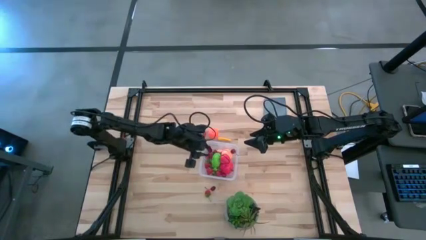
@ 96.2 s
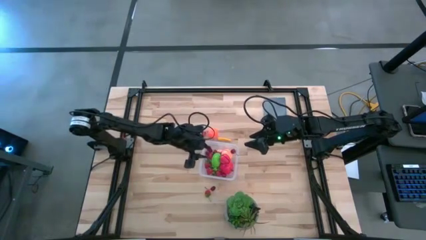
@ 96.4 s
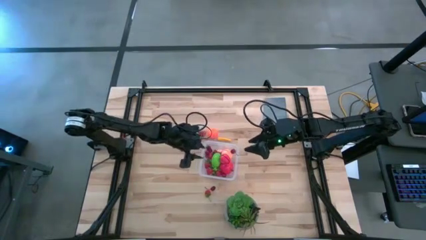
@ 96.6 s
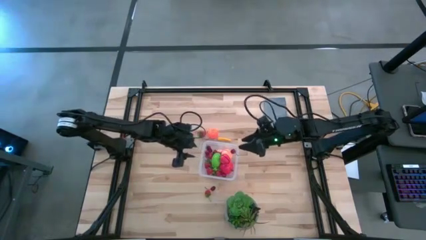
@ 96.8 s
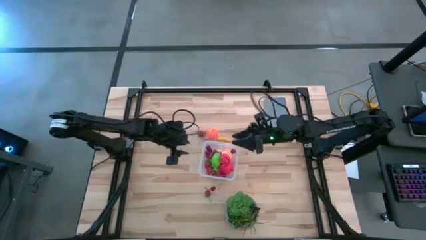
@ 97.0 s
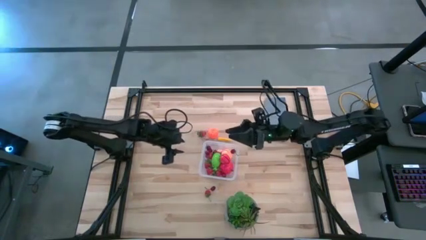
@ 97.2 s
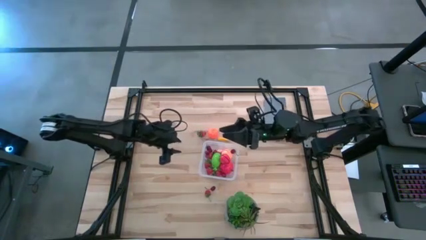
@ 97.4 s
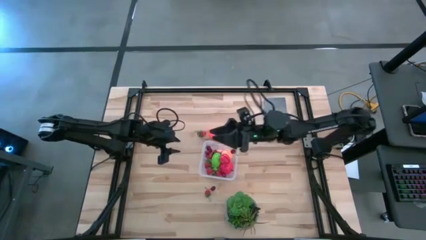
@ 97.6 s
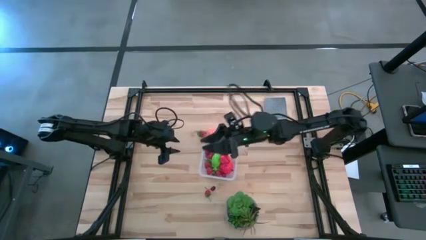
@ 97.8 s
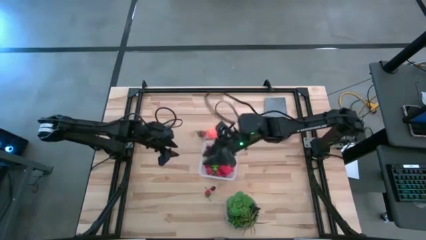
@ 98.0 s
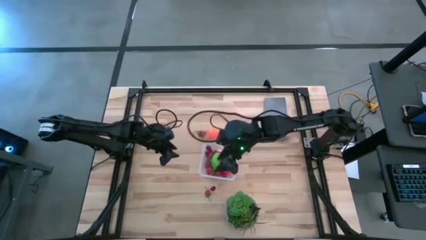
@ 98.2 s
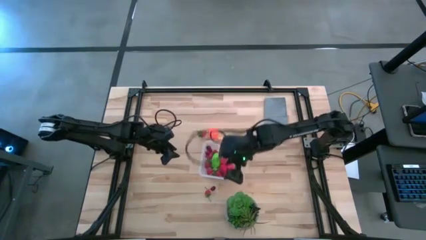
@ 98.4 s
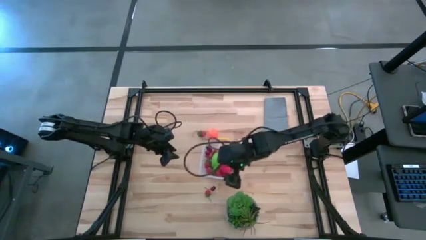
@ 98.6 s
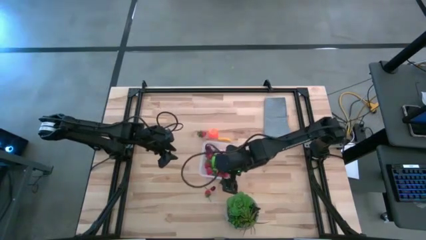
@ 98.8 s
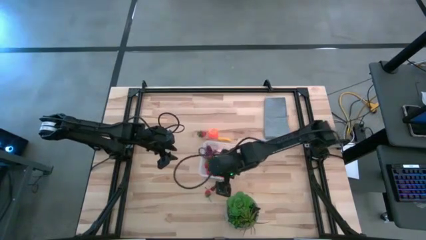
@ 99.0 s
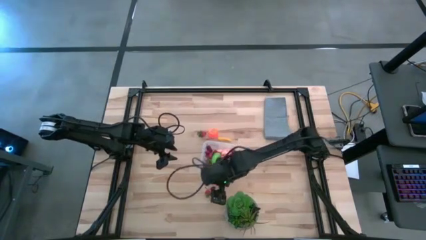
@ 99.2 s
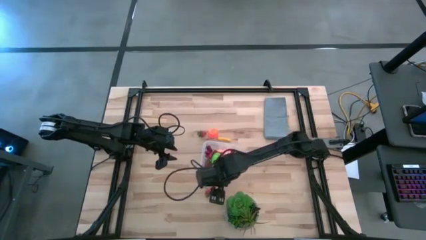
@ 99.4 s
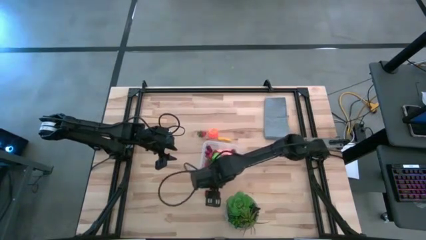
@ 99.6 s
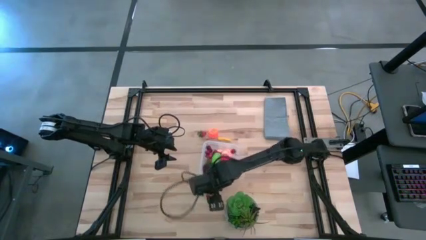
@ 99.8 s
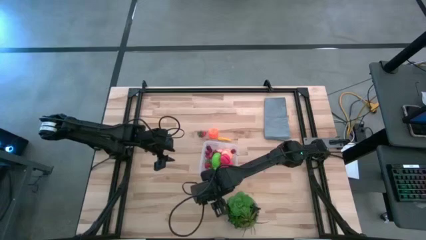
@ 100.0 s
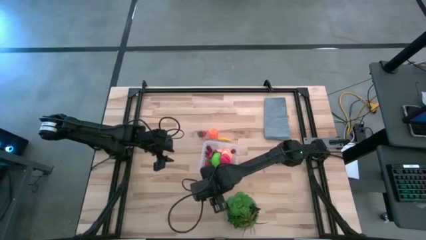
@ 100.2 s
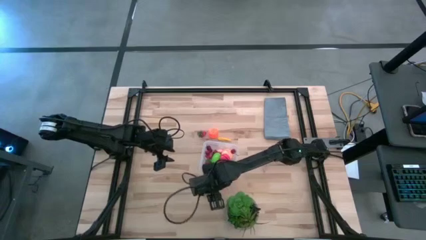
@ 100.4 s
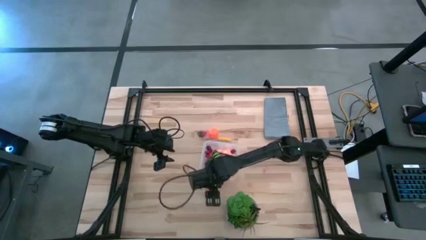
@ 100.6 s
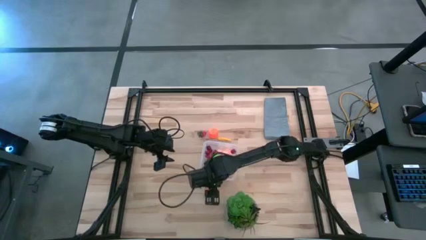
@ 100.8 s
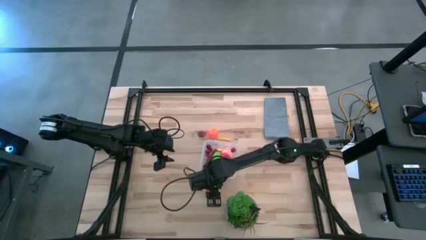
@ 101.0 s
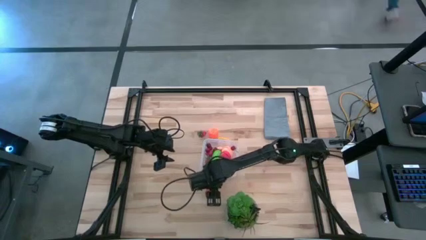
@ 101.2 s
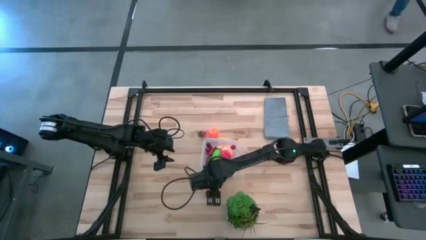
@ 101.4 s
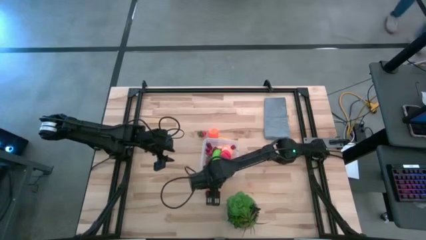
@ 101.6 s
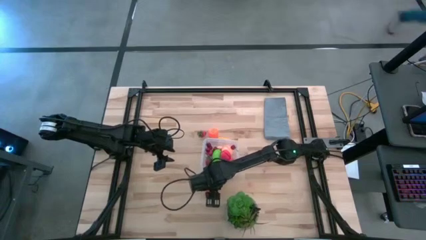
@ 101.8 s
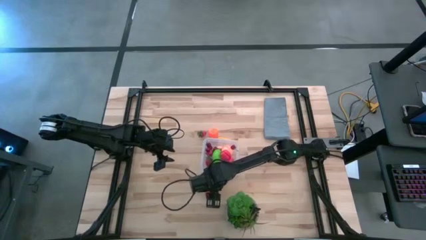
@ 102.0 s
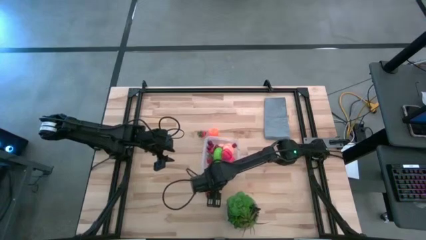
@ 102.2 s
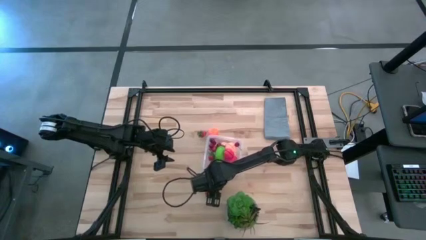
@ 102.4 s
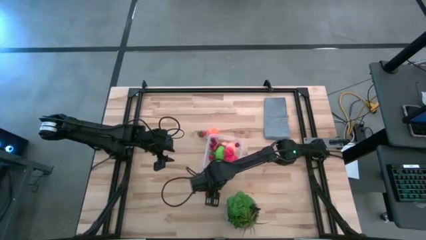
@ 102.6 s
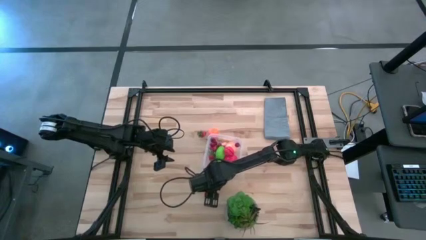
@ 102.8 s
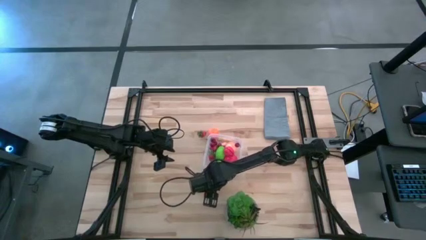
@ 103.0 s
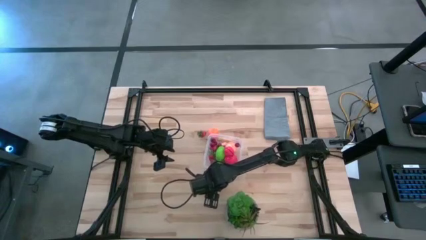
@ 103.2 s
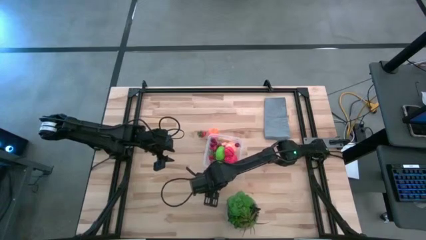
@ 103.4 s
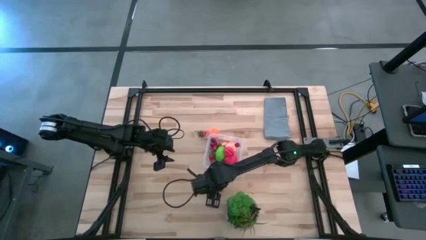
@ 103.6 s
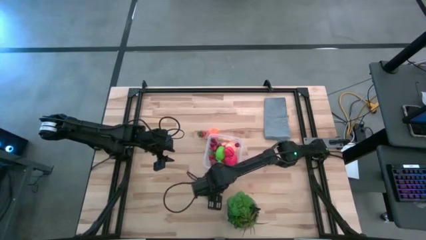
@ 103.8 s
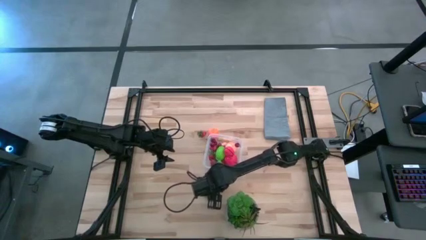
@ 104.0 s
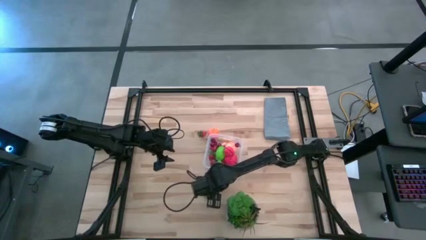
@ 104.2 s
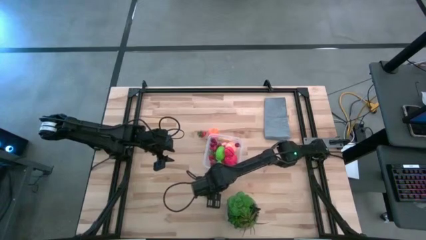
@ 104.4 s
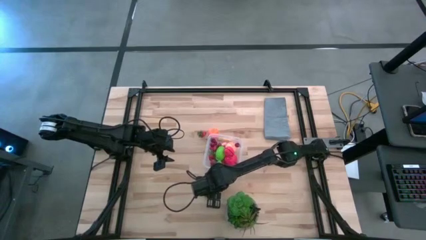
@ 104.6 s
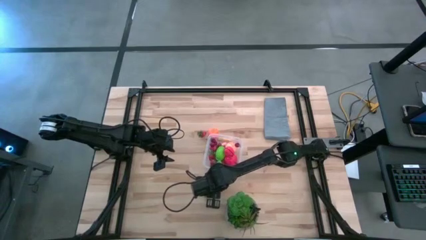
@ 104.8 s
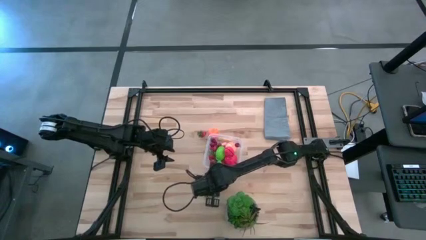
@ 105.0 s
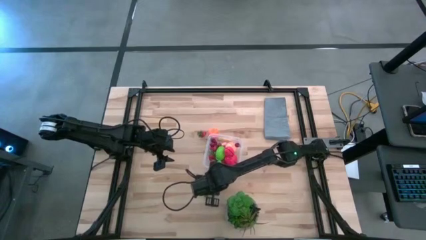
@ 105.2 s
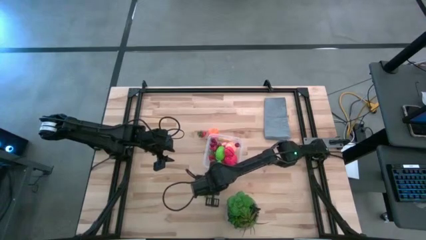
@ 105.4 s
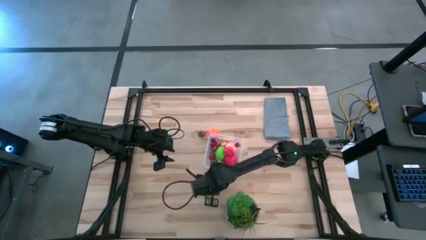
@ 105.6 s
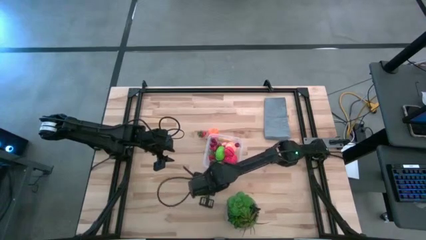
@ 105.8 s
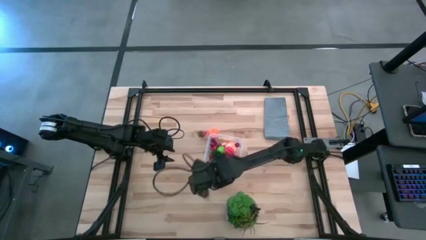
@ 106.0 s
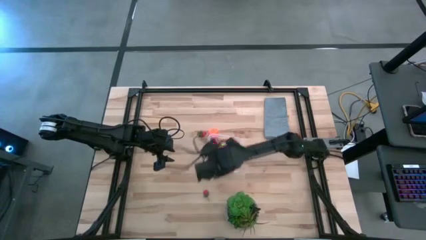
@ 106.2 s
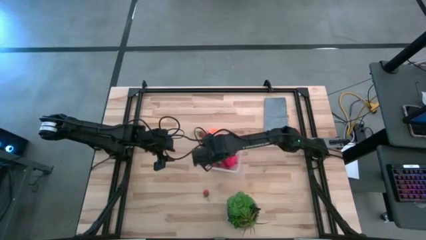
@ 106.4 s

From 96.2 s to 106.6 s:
Task: Pick and placing Produce into tupperware
Put the red cherry into the transparent container

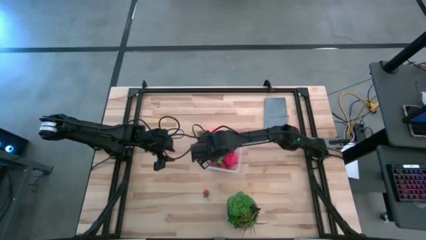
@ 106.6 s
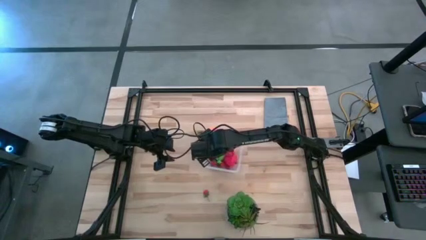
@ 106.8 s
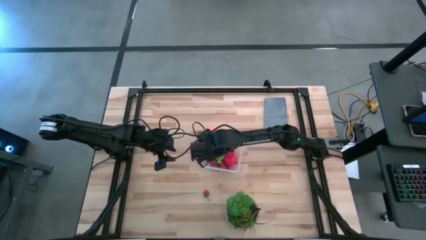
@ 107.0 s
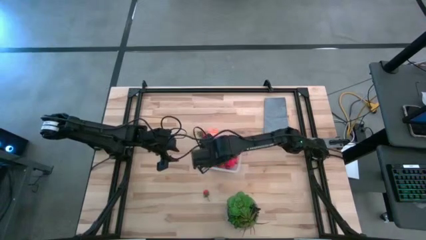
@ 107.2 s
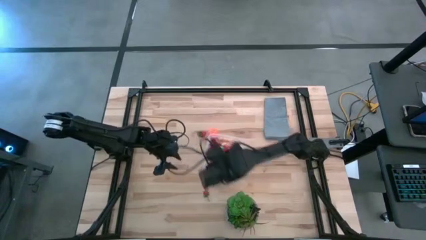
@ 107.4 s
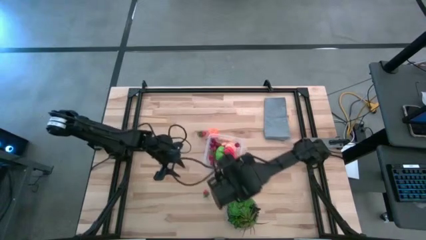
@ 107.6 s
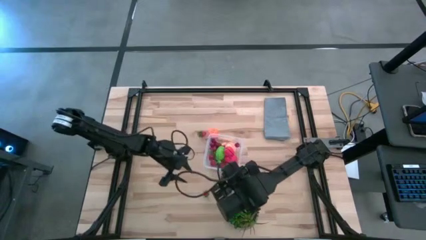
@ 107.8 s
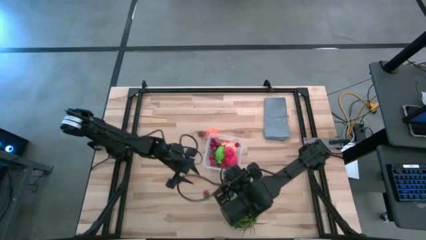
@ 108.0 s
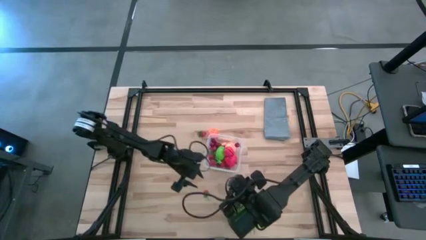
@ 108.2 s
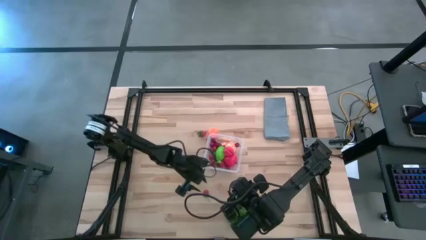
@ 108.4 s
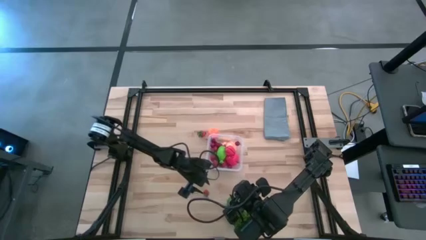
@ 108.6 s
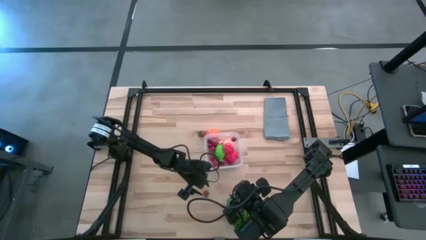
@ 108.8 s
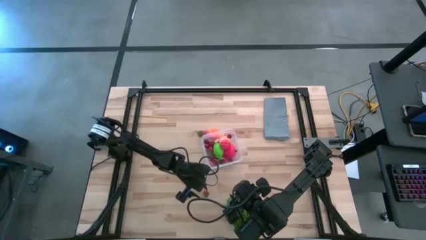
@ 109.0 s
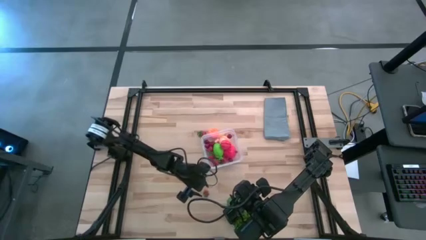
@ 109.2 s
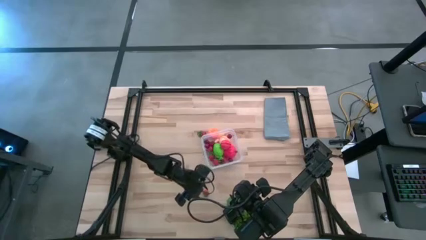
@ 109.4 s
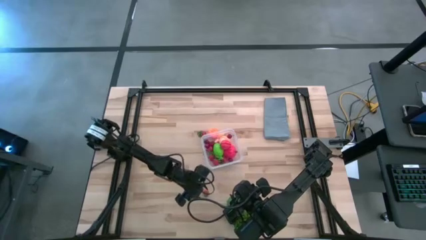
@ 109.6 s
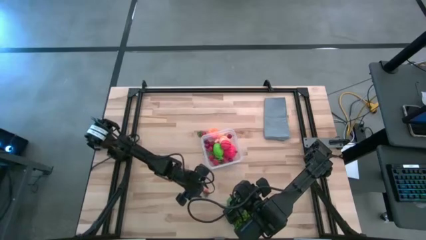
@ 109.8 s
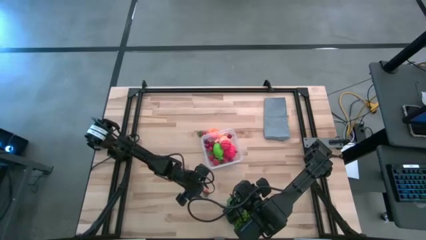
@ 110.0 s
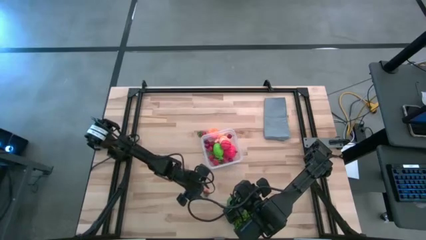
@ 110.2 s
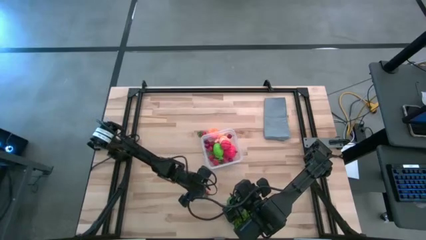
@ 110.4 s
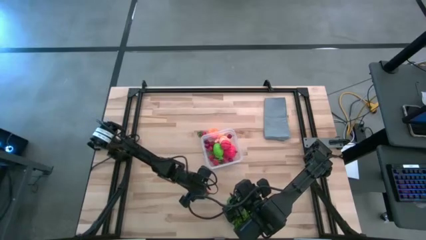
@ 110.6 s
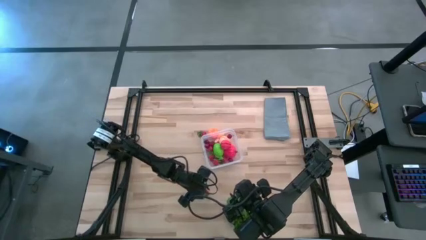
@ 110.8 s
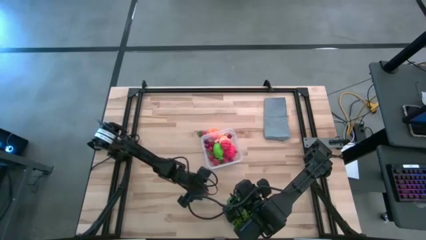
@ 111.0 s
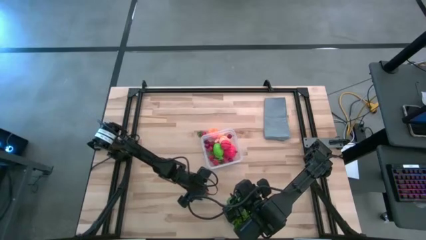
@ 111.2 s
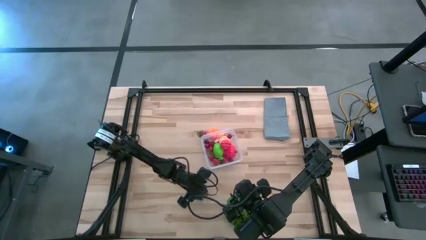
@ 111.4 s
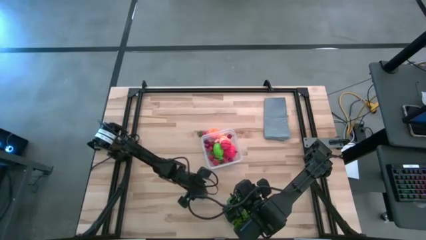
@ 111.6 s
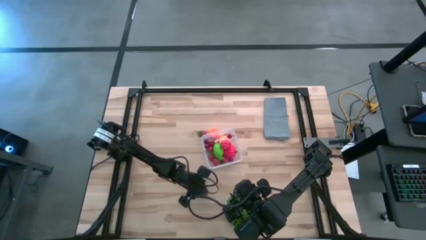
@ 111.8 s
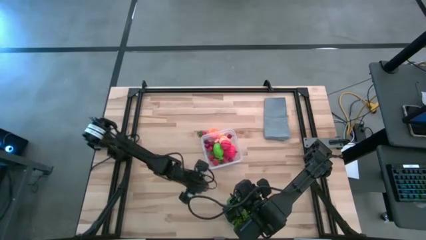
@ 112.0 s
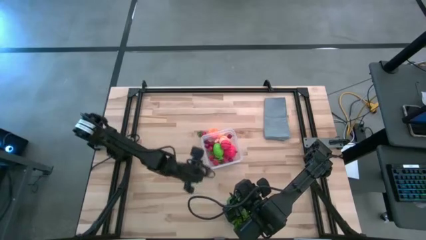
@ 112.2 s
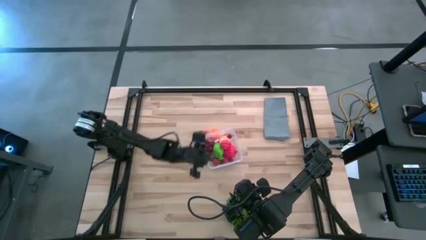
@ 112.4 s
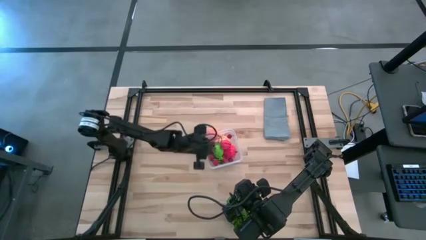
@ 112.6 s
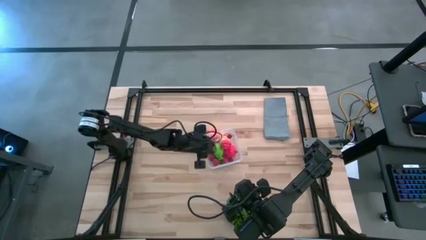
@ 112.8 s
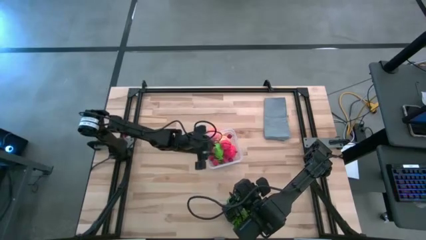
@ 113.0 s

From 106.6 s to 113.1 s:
Put the red strawberry into the transparent container
